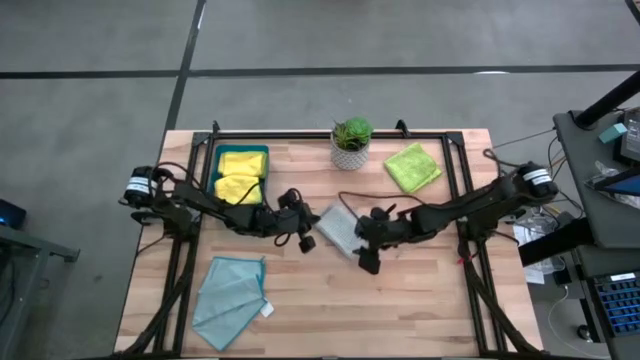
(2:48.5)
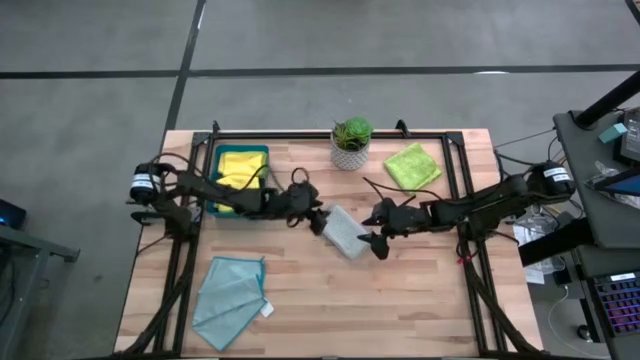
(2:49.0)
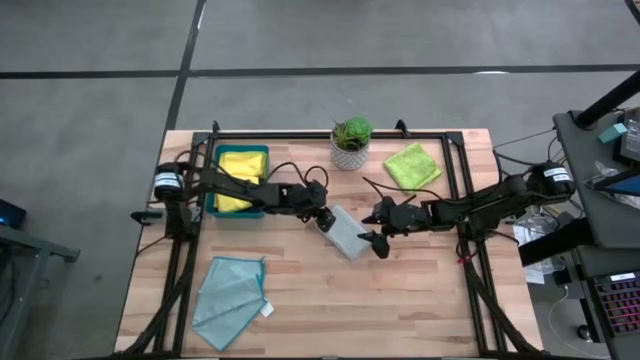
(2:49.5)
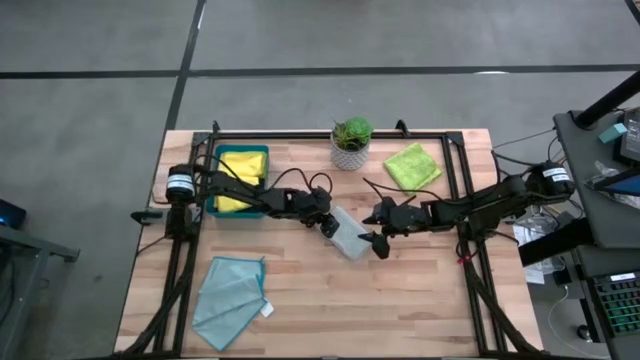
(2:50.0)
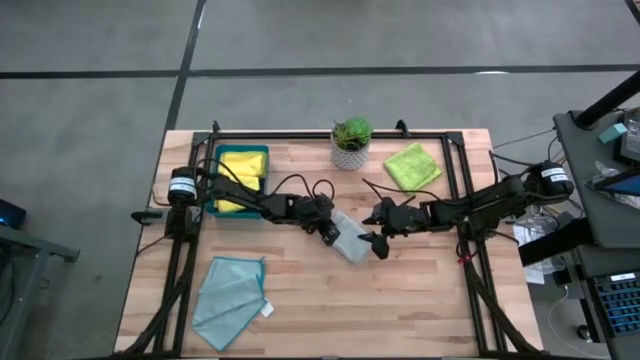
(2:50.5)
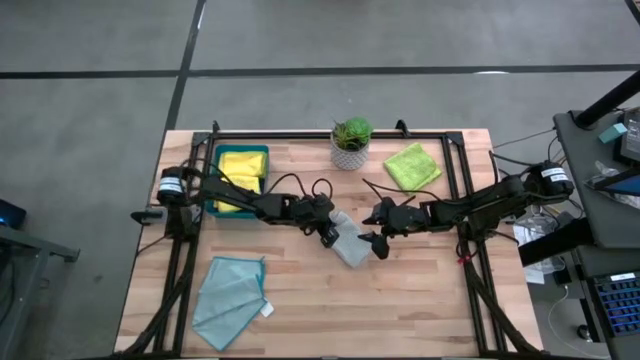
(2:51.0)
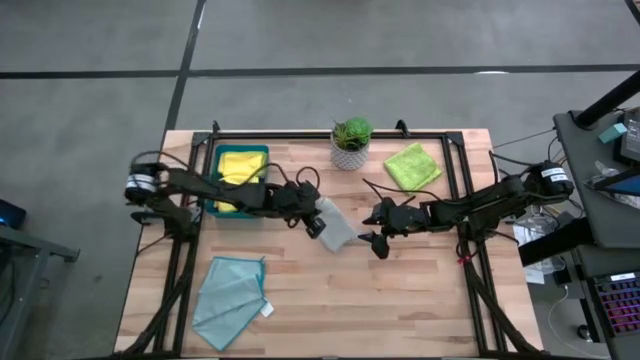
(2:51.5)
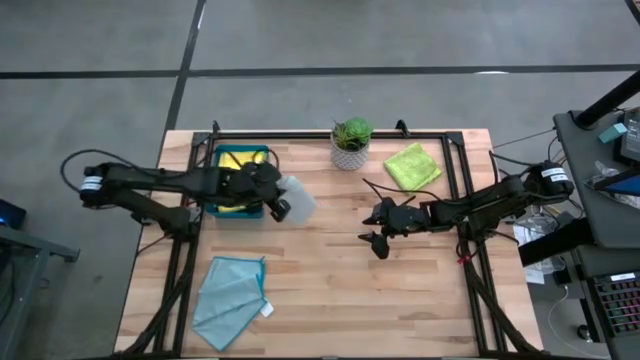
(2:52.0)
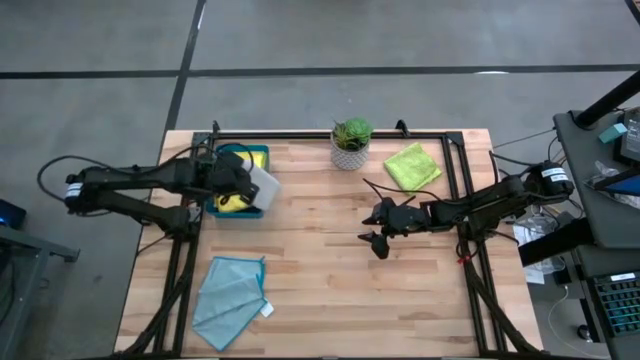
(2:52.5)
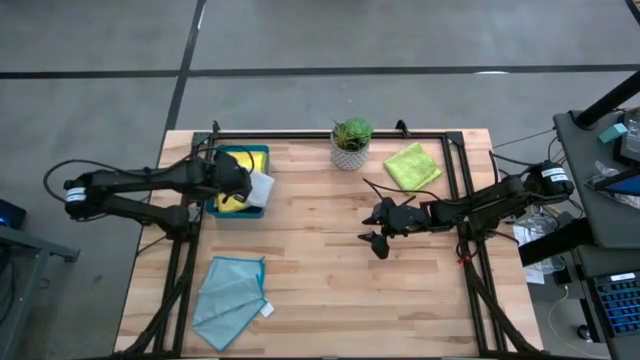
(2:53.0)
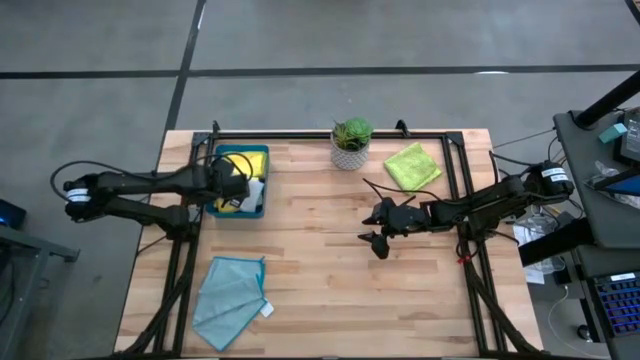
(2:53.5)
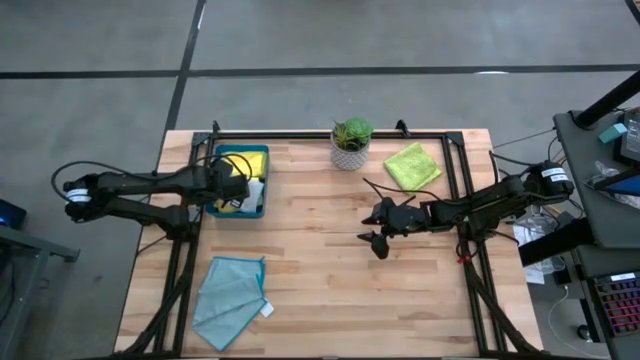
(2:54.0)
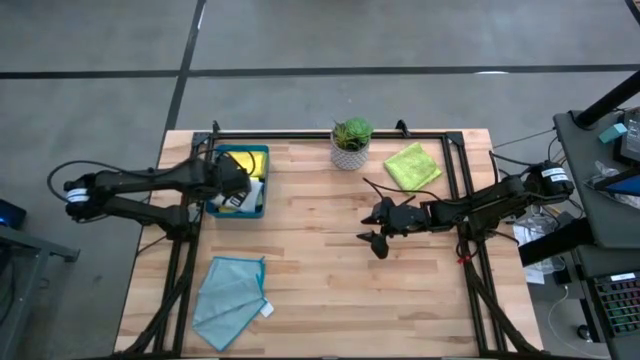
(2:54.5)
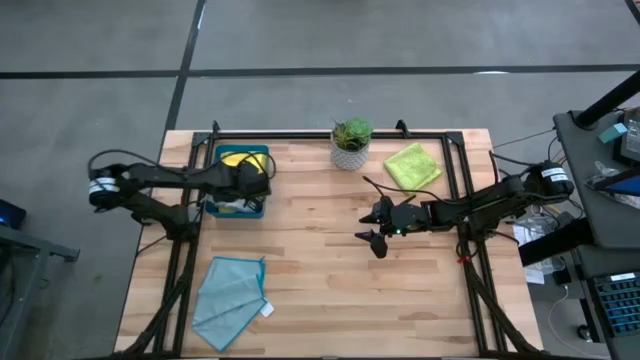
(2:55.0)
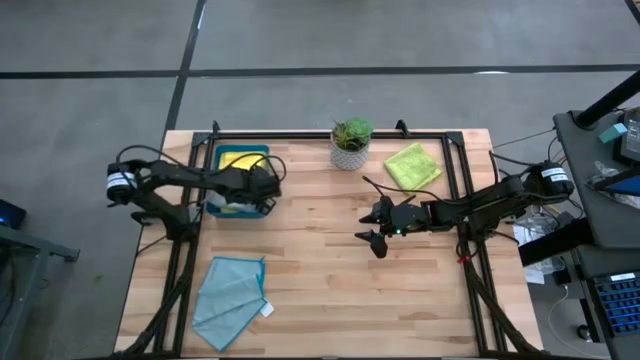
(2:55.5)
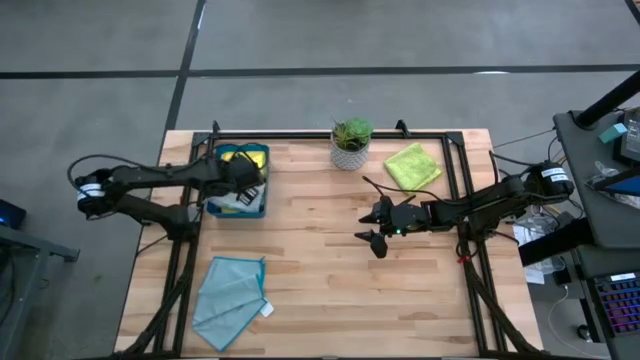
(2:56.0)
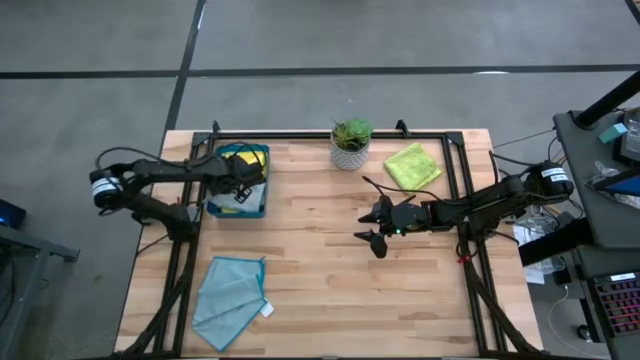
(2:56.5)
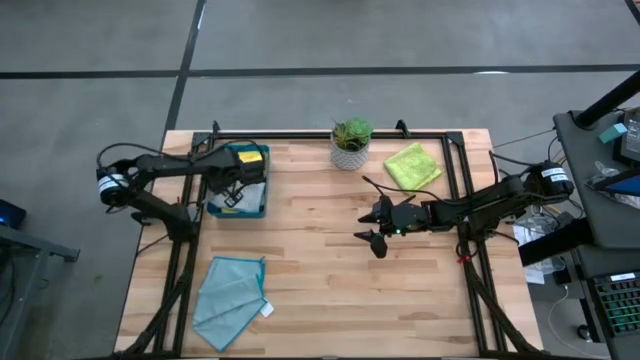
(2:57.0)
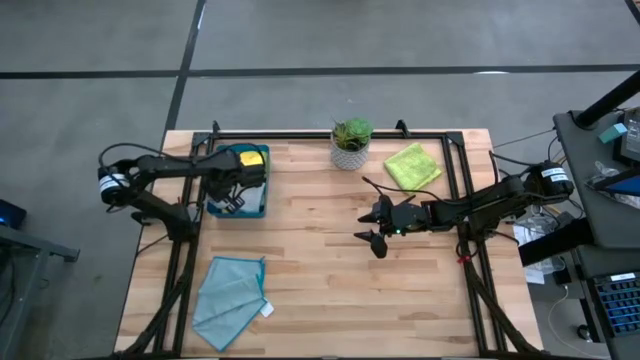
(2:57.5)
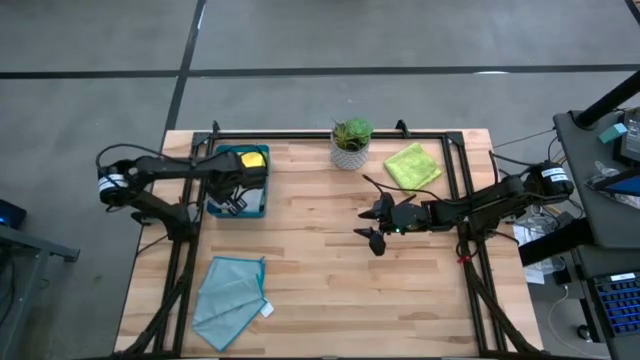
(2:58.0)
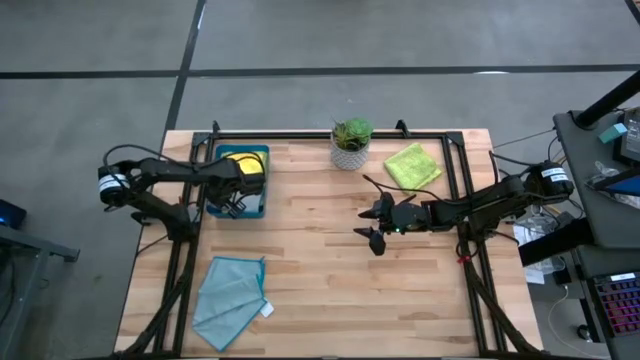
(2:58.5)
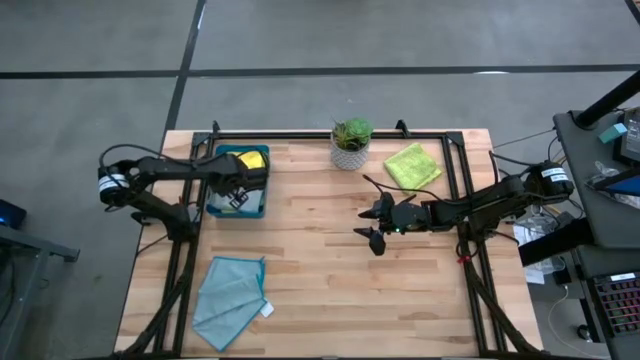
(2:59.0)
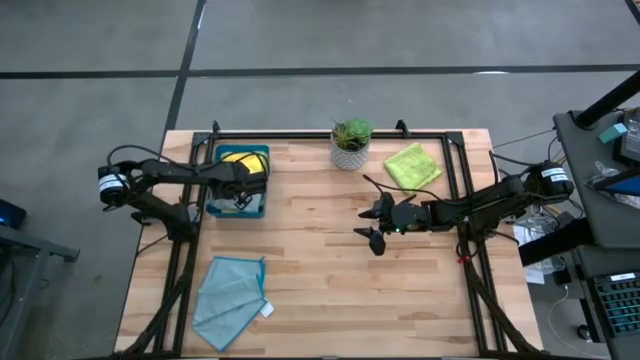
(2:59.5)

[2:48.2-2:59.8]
Task: Fold microfiber towels
Put the folded gray towel into the blue bin

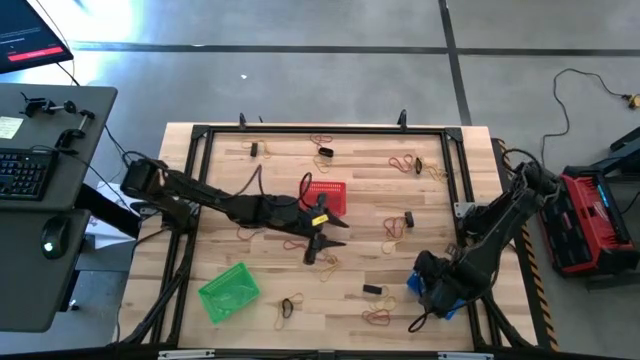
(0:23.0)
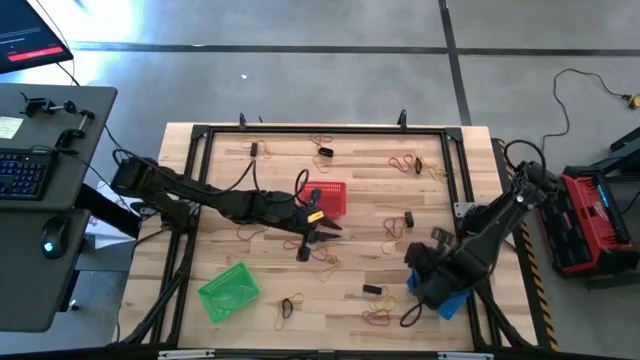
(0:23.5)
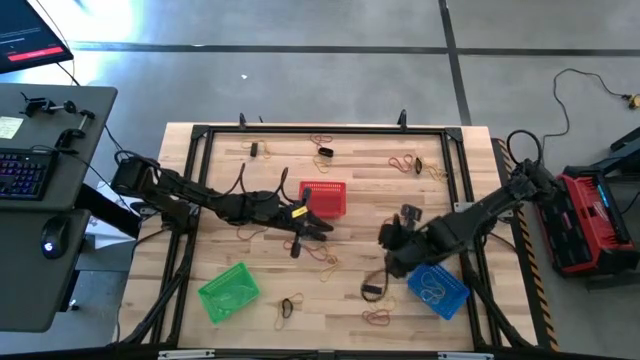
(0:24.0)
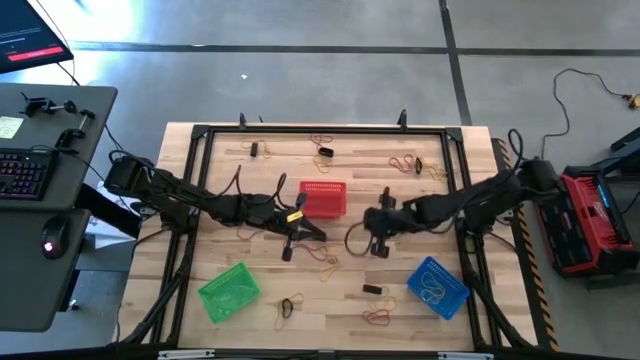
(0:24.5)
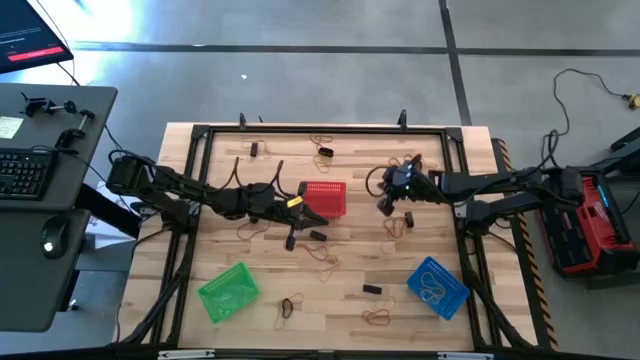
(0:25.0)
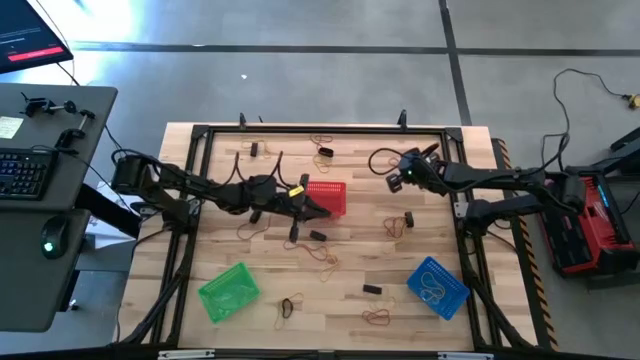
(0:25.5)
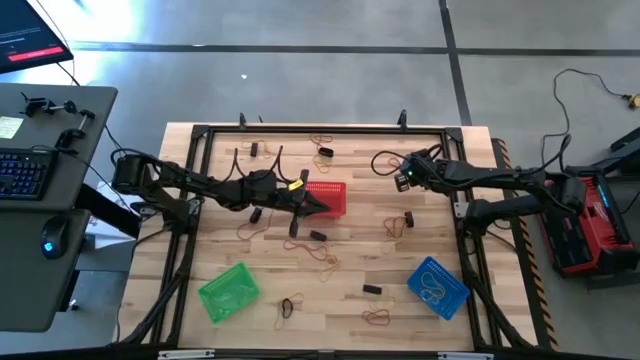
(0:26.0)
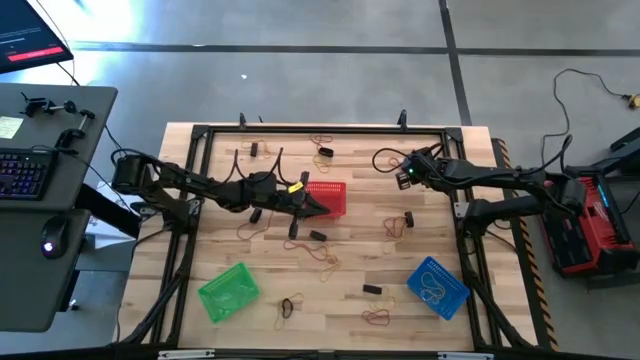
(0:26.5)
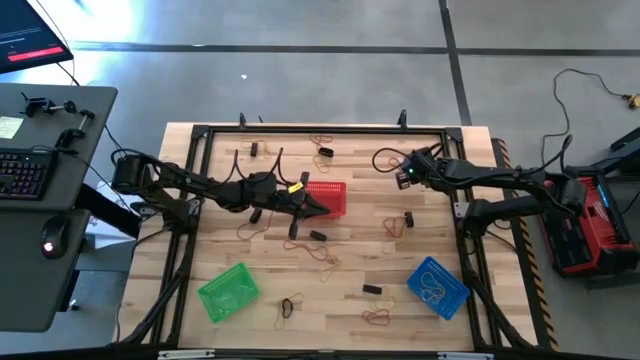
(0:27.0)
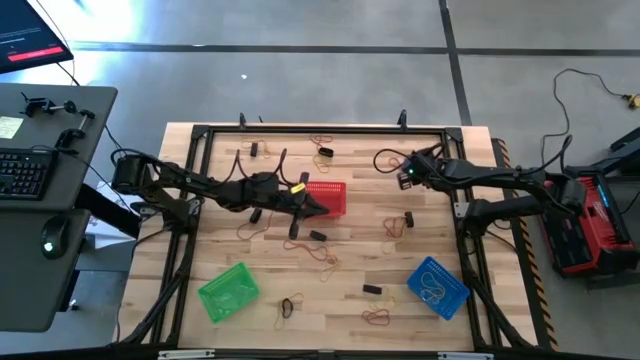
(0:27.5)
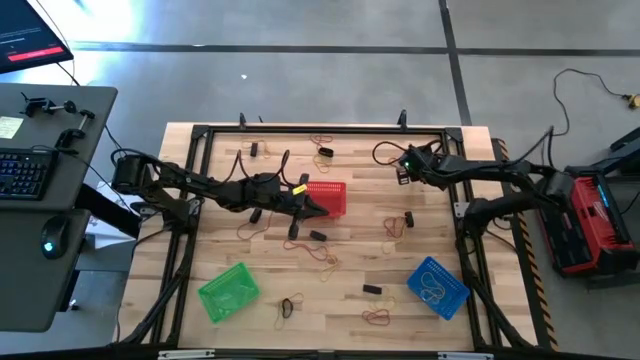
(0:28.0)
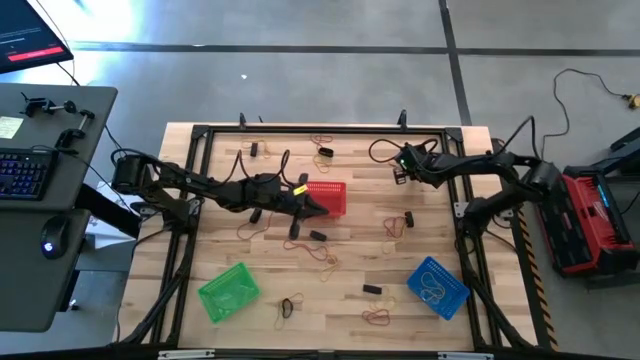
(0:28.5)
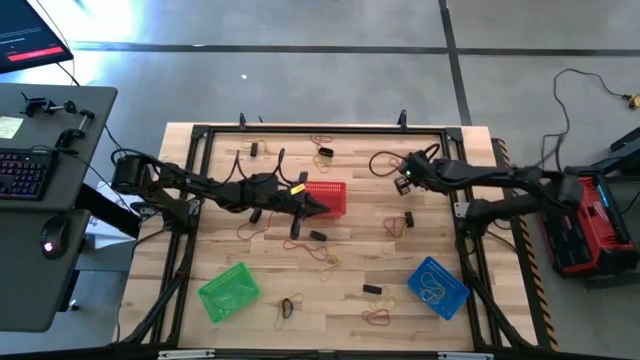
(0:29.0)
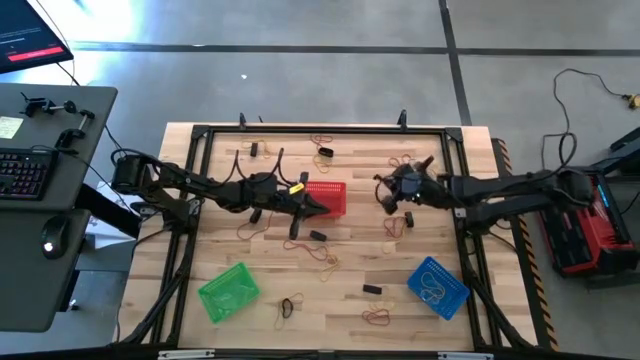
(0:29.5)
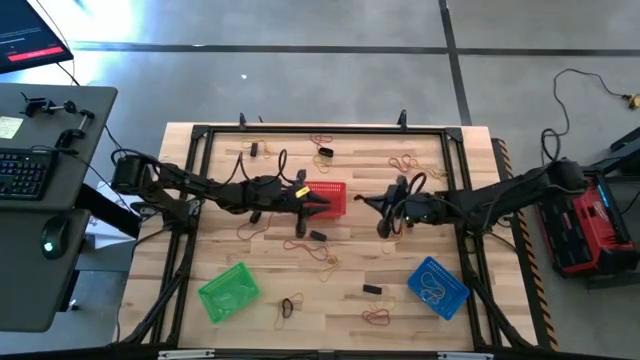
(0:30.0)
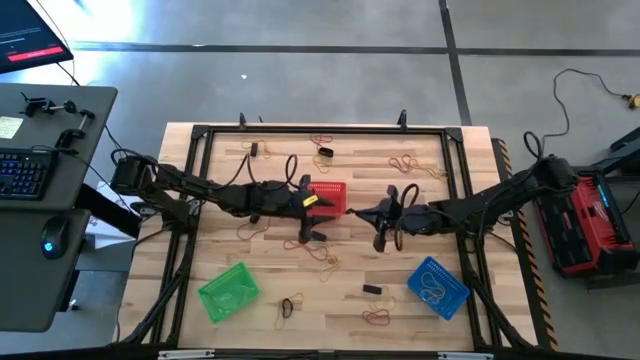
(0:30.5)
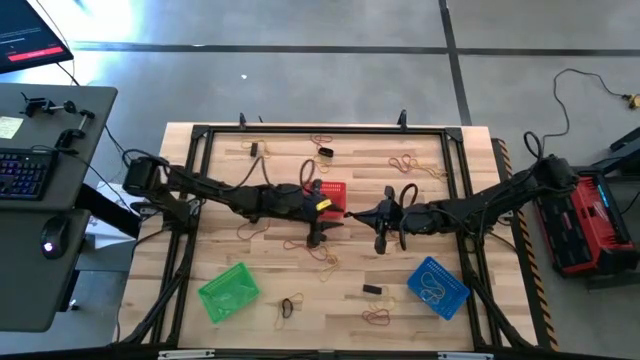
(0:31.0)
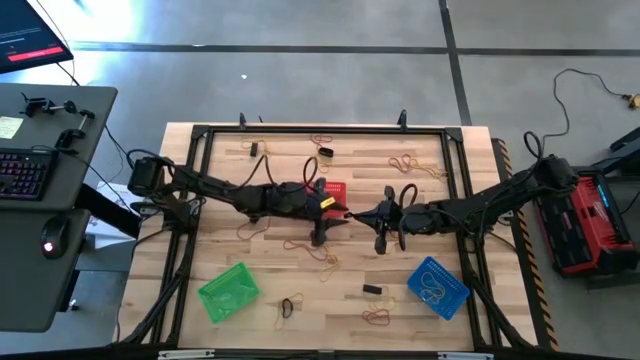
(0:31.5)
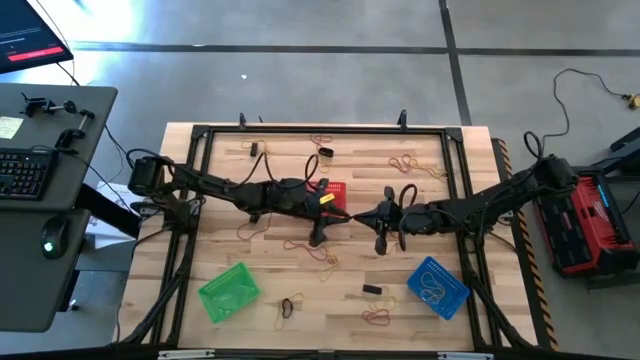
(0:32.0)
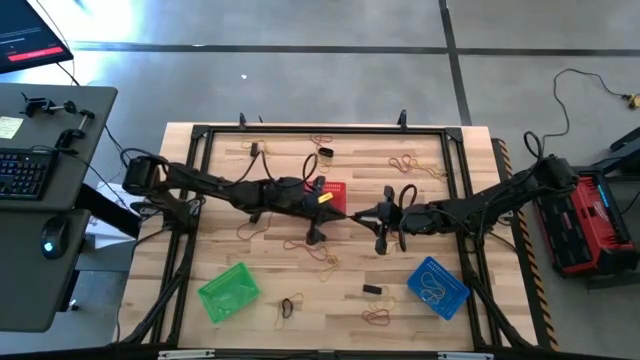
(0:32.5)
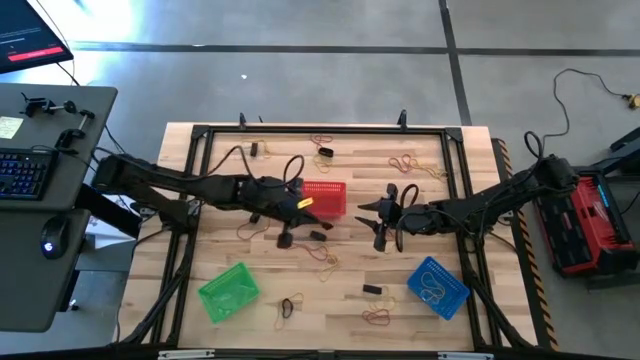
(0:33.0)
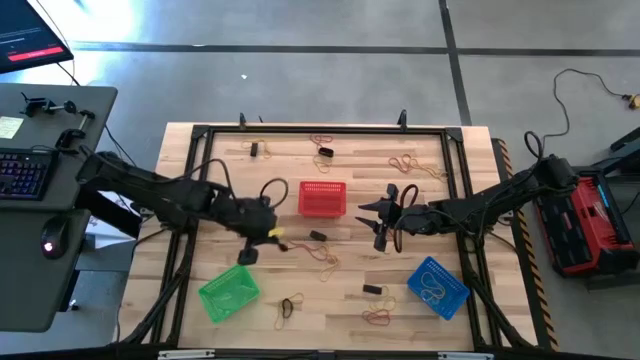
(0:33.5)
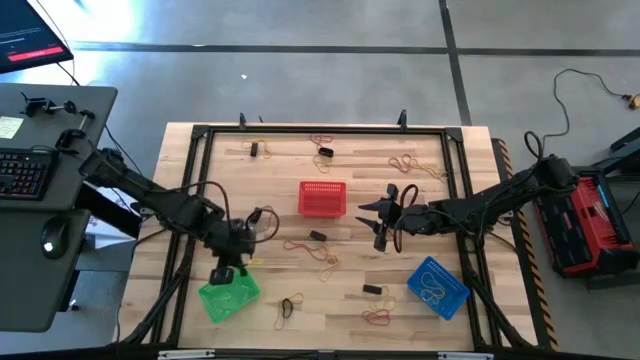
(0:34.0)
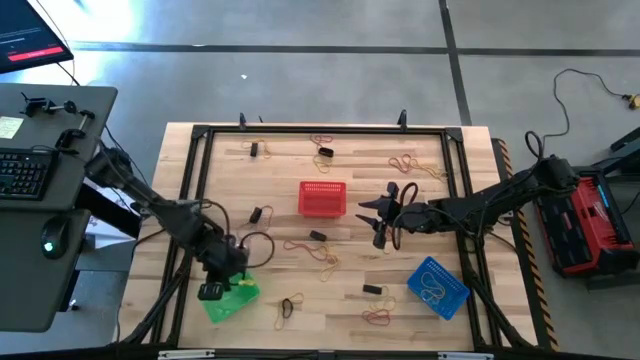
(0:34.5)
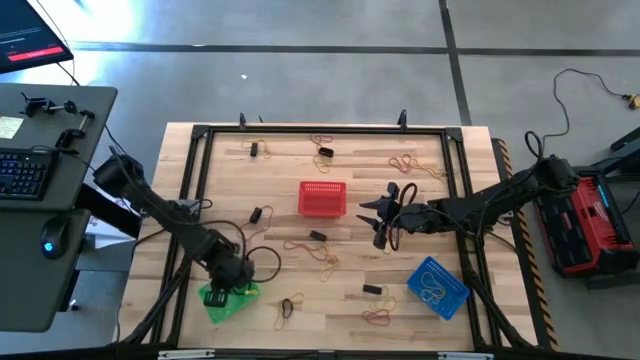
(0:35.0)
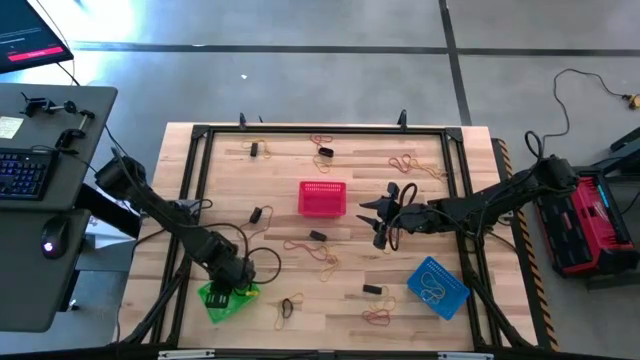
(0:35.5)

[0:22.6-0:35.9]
Task: Sort rubber bands into baskets
Put the black rubber band into the green bin
